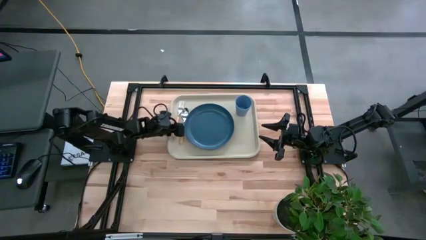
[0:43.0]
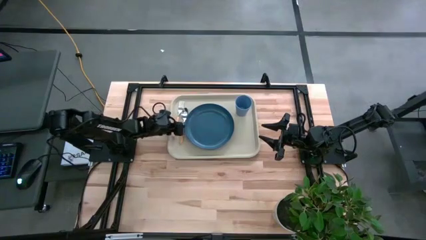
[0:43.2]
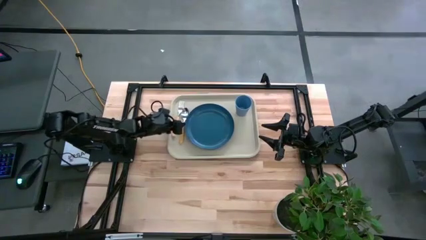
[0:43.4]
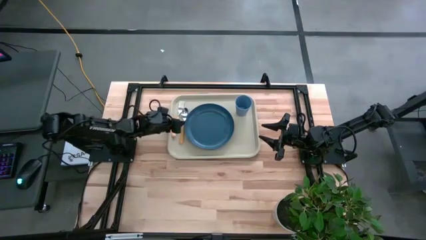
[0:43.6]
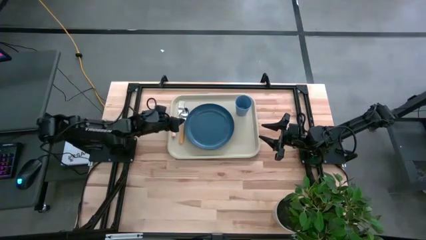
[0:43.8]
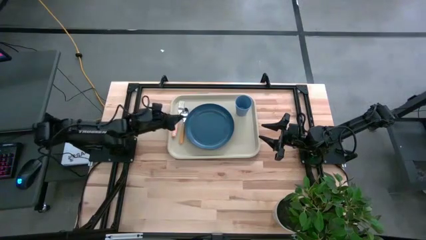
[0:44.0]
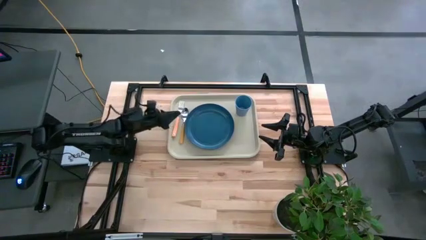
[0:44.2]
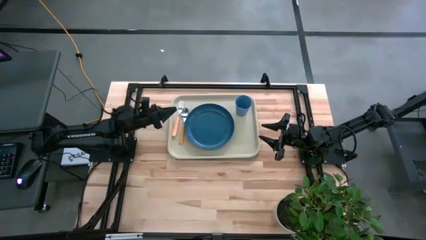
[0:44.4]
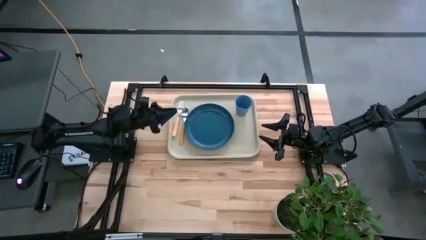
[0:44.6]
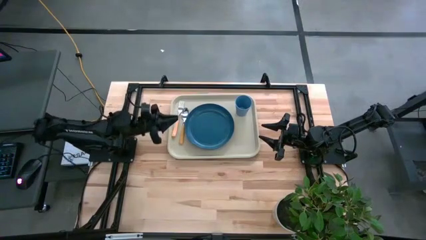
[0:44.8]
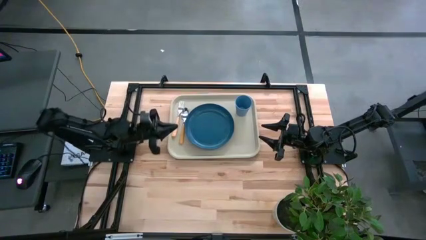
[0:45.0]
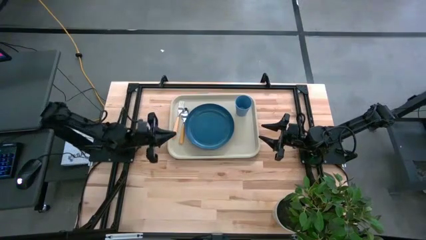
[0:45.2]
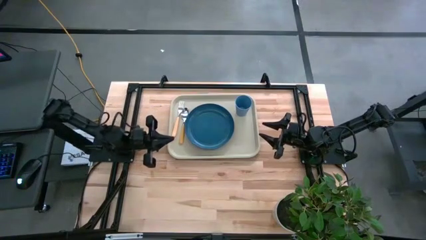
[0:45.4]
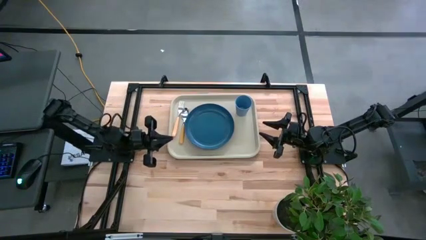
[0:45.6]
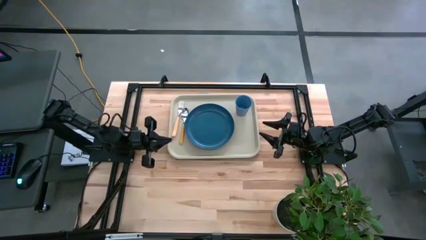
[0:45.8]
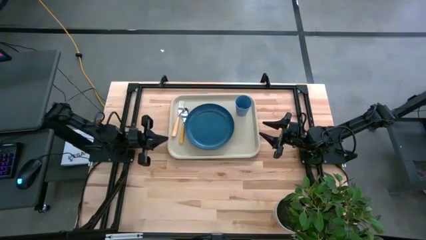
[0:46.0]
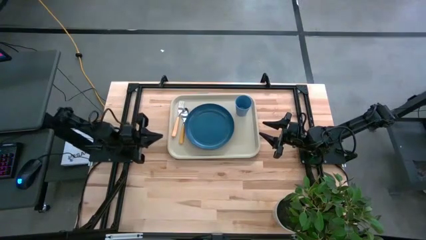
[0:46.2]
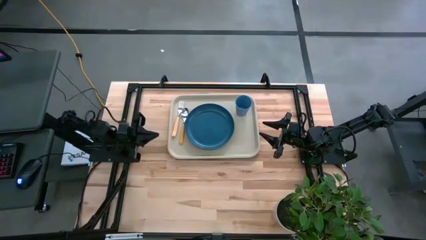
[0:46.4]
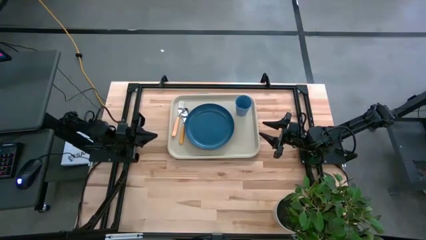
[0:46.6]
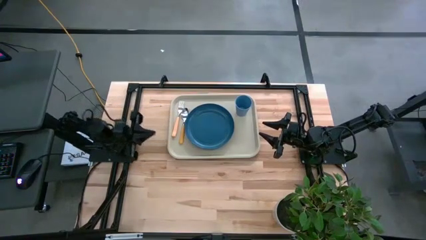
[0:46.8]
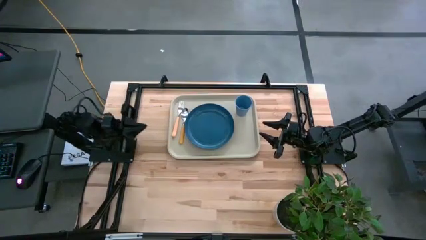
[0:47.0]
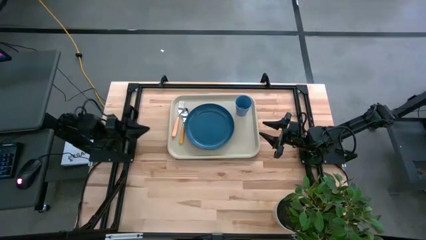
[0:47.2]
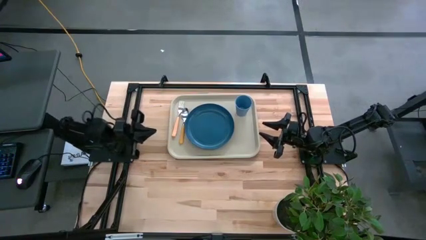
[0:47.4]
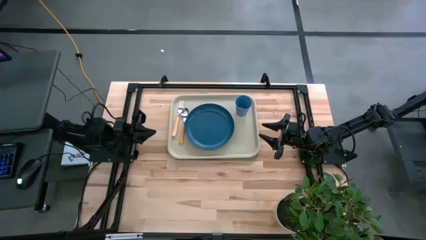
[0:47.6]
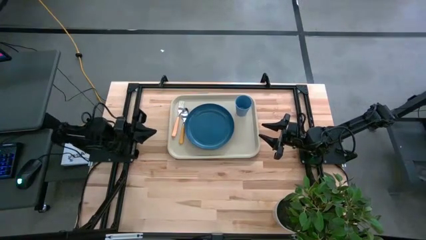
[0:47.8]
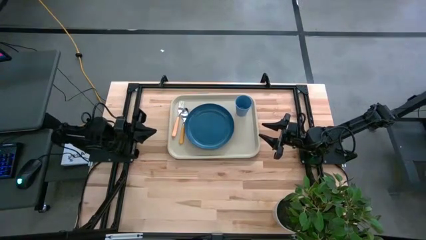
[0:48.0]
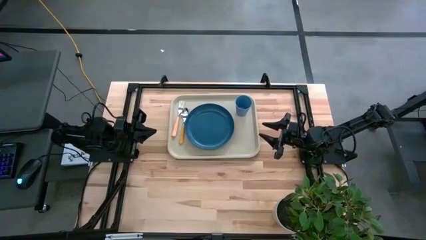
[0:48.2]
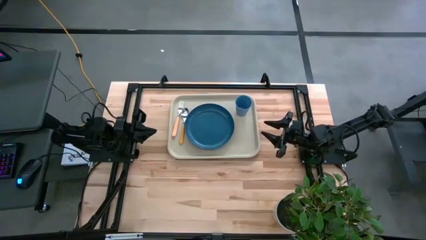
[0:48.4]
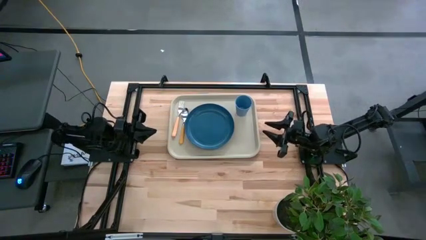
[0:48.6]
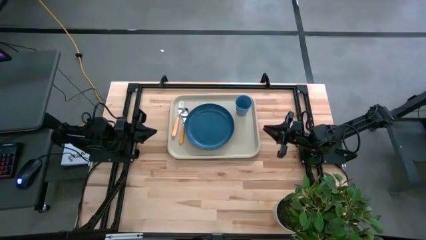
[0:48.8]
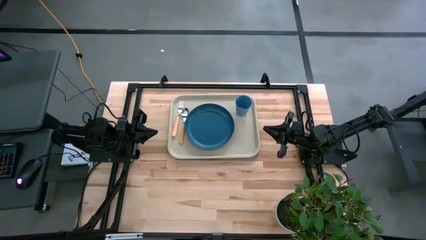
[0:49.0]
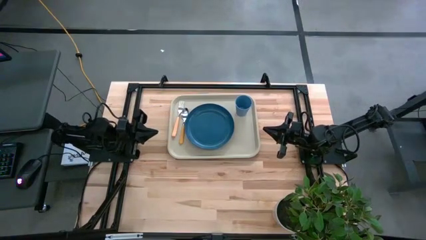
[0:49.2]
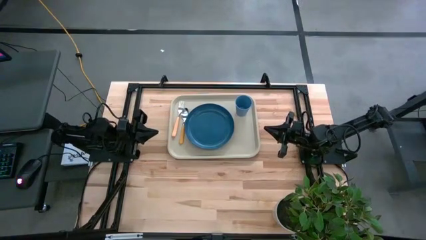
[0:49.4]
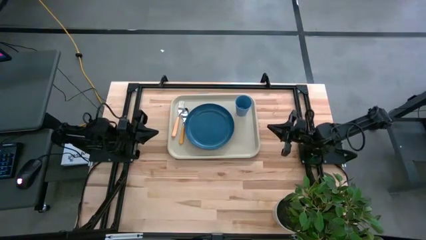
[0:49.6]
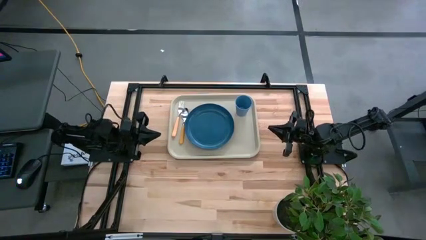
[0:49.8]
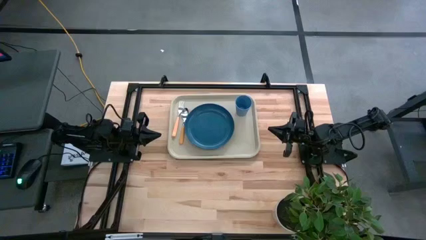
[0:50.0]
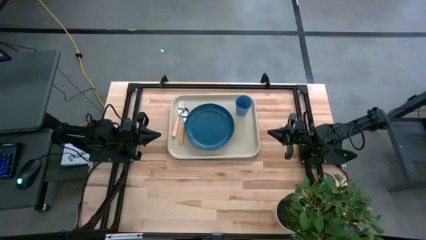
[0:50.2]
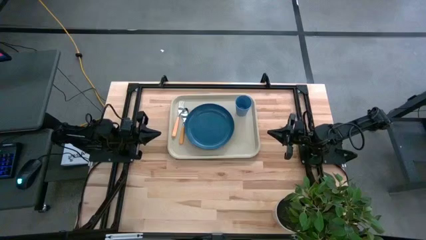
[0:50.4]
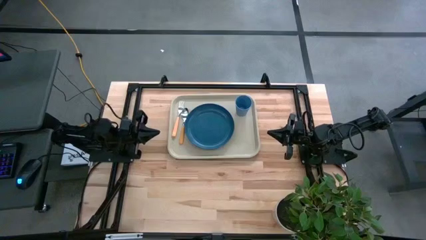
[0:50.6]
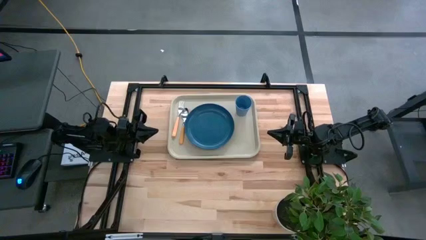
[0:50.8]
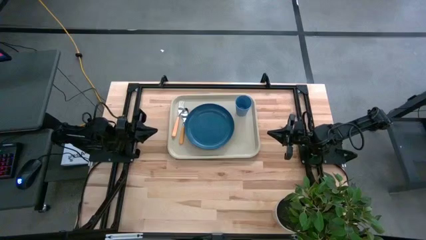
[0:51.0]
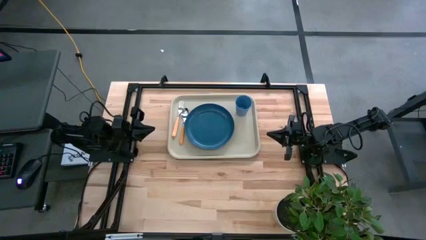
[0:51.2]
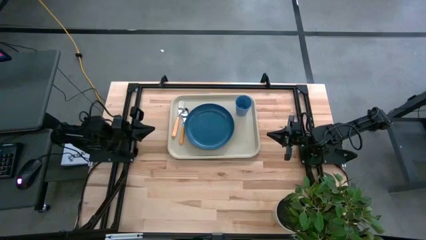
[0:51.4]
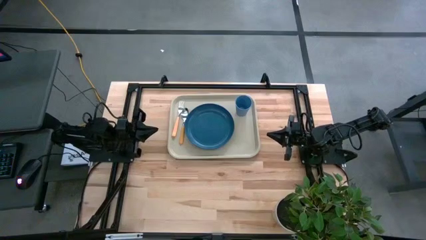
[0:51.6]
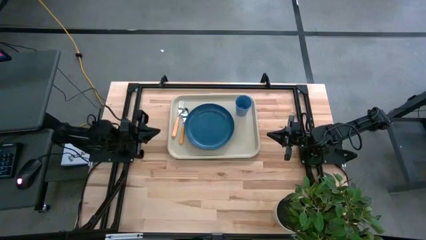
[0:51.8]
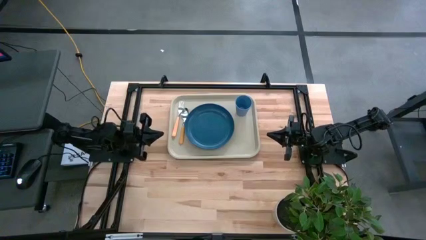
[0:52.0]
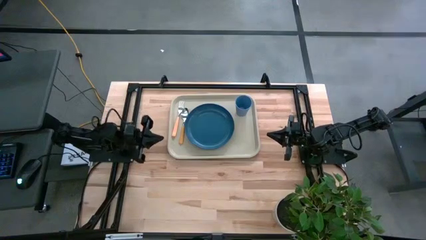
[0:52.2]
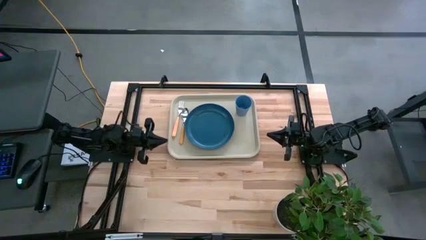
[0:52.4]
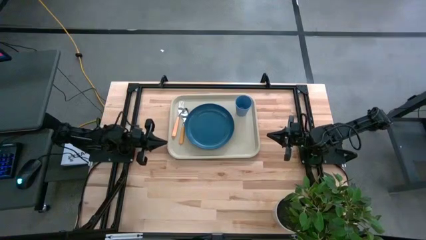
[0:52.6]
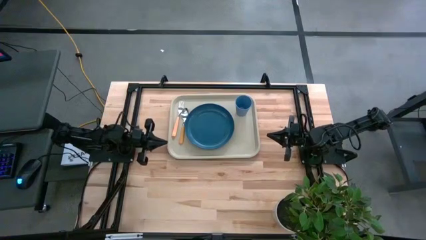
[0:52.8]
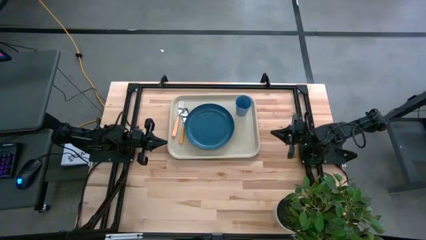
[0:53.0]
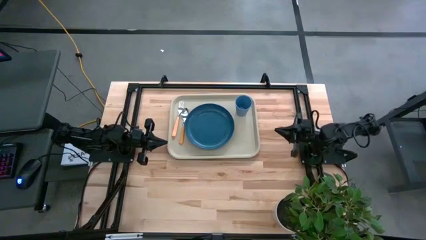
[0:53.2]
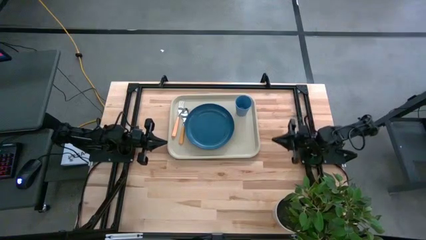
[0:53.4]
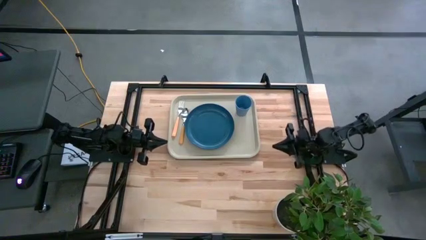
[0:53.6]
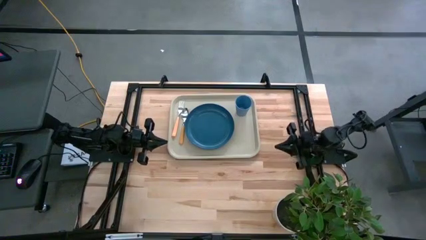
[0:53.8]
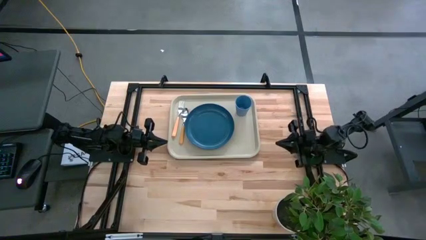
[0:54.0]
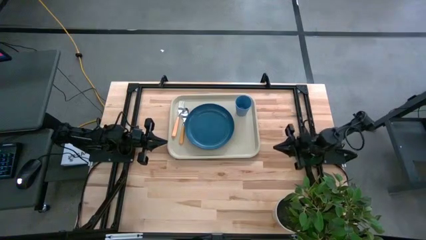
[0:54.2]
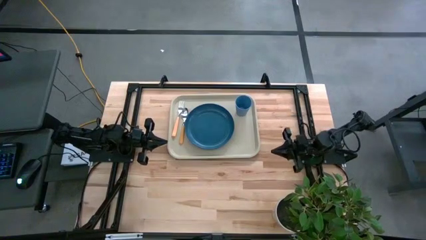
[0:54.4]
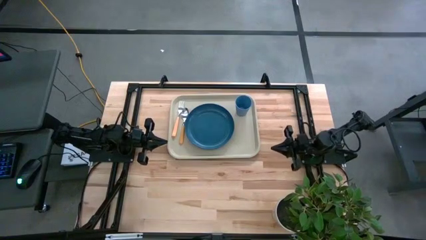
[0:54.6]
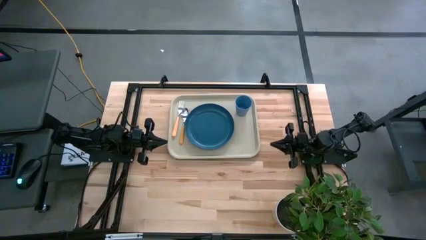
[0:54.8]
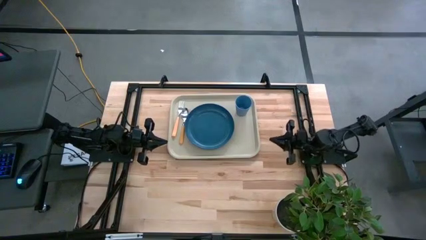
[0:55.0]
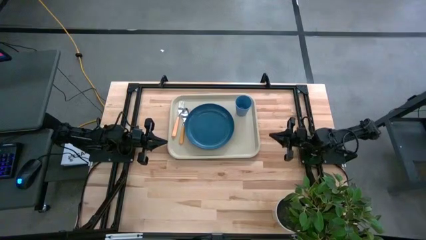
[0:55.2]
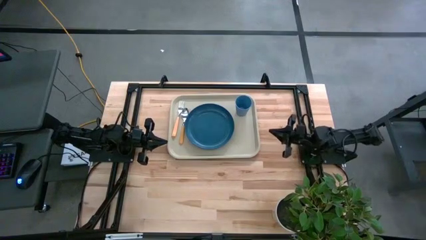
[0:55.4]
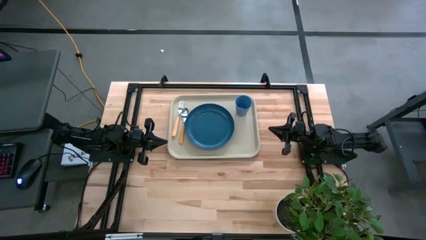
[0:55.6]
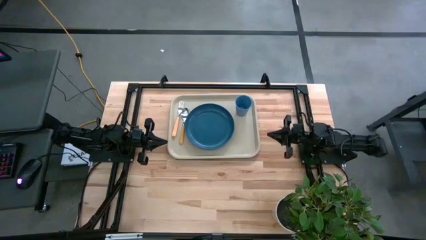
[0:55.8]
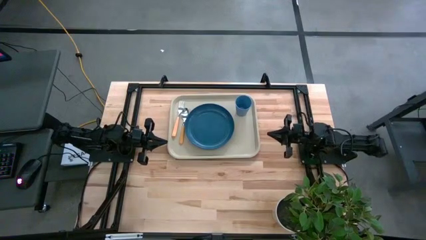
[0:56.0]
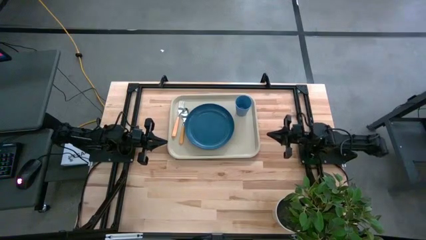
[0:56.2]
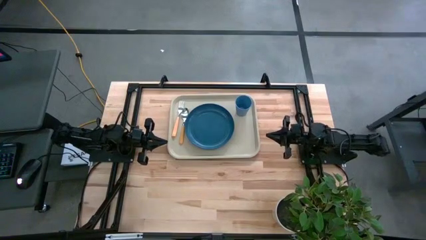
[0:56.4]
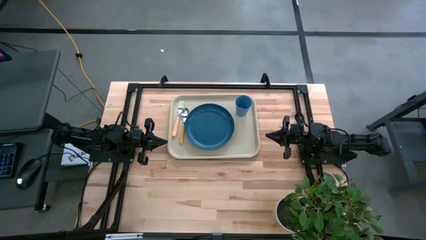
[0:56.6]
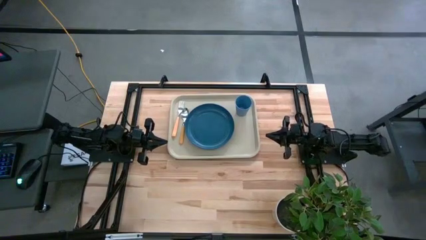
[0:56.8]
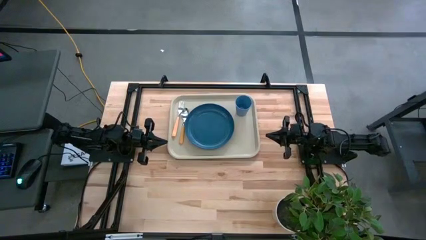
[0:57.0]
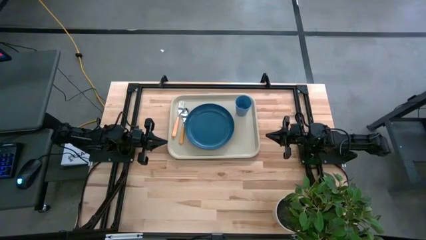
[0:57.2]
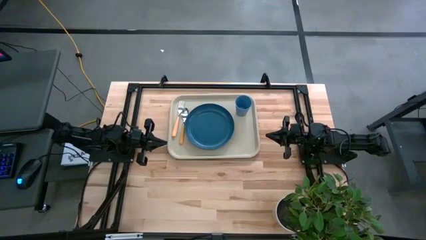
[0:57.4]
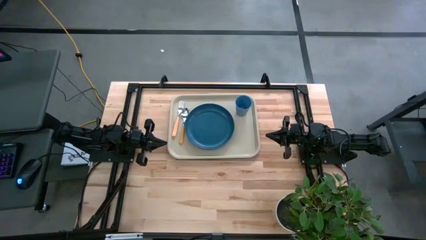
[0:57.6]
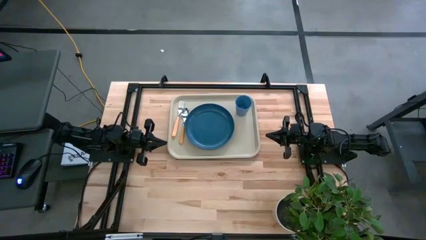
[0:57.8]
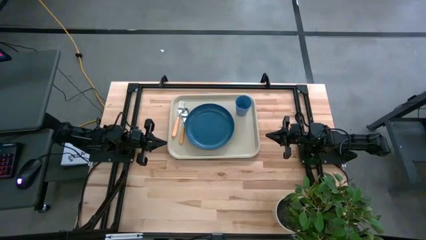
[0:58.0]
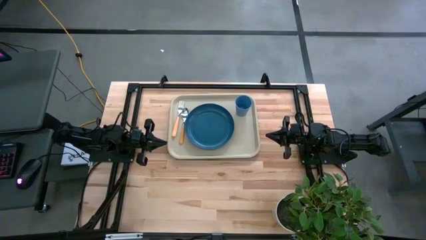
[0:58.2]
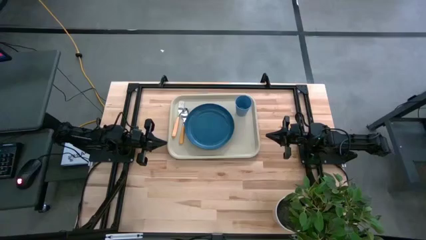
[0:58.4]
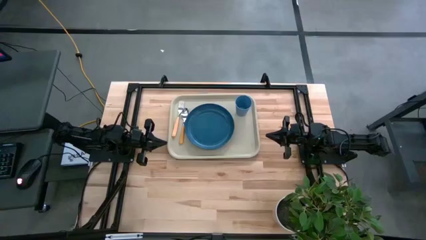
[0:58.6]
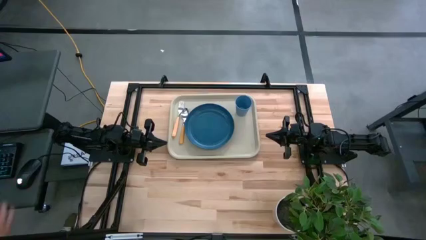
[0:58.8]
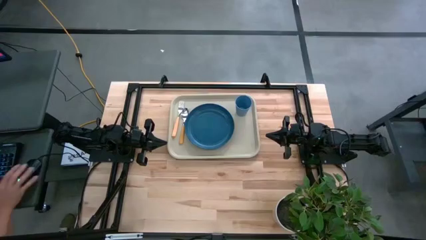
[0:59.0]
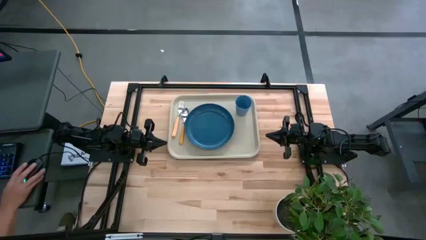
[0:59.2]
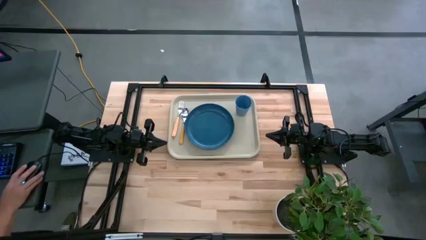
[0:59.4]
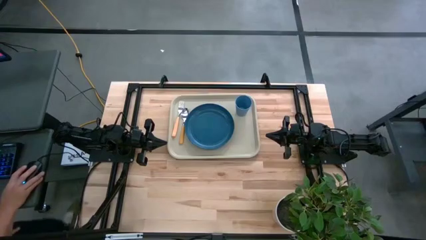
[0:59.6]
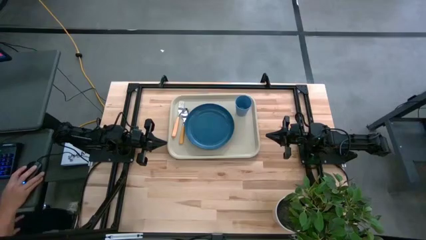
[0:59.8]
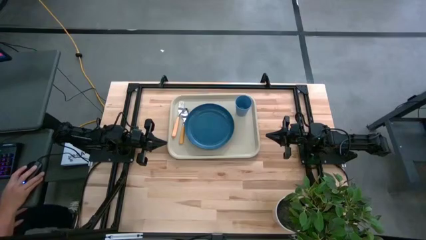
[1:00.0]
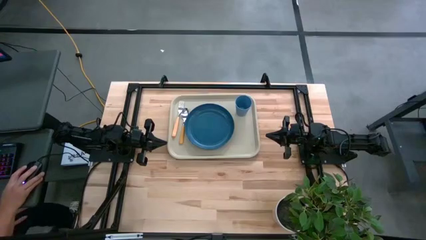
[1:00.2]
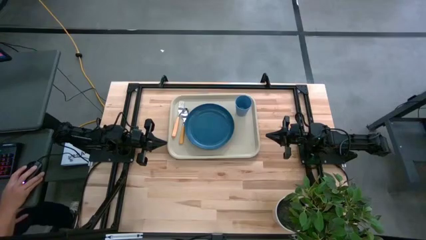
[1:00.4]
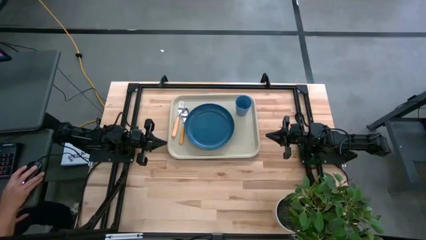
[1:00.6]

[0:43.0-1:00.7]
Task: Pick and place plate/cup/fork/spoon on tray
Return to Home Position
